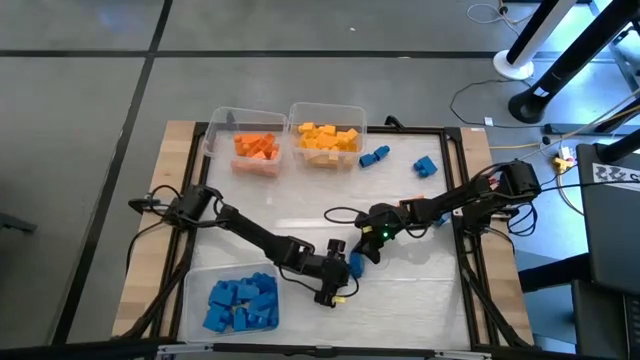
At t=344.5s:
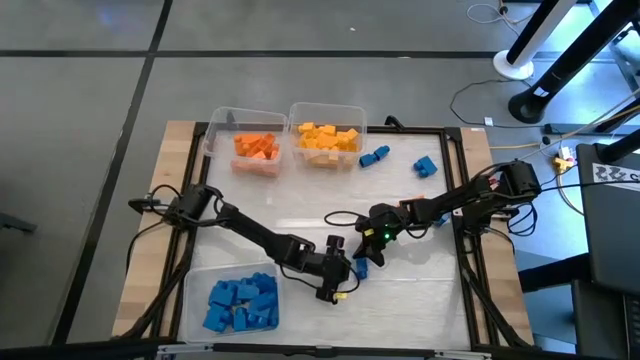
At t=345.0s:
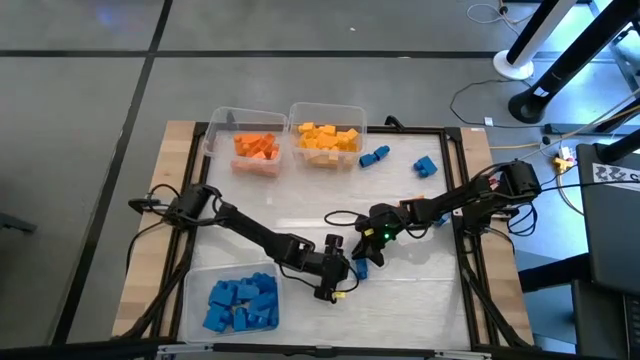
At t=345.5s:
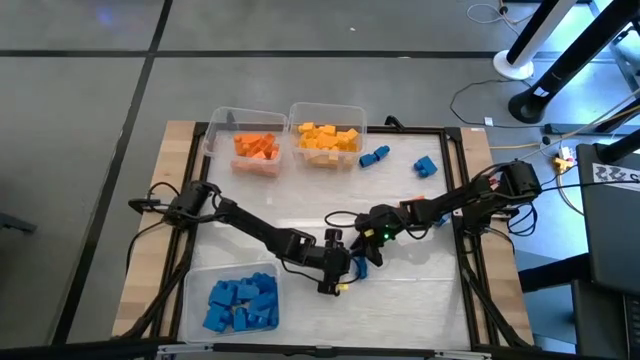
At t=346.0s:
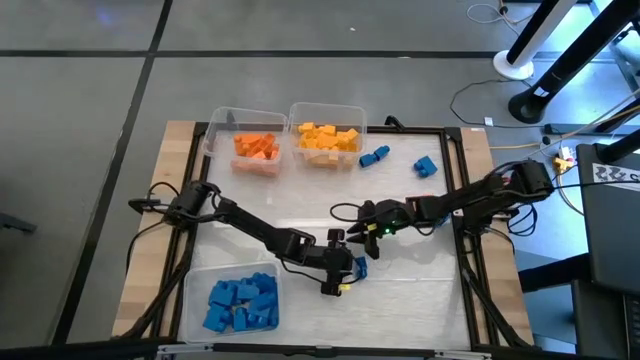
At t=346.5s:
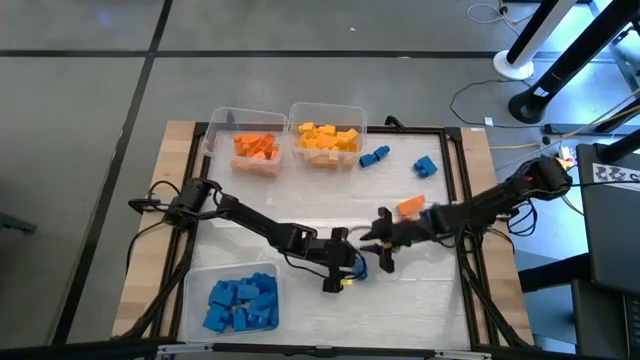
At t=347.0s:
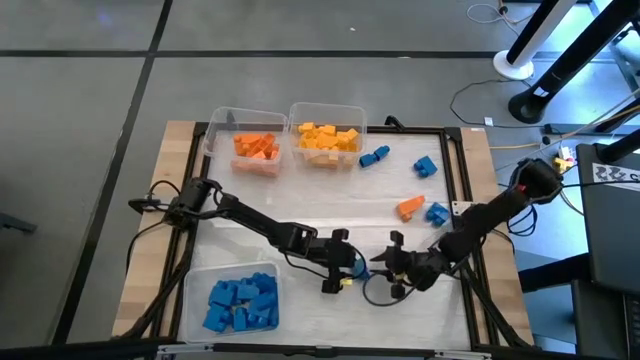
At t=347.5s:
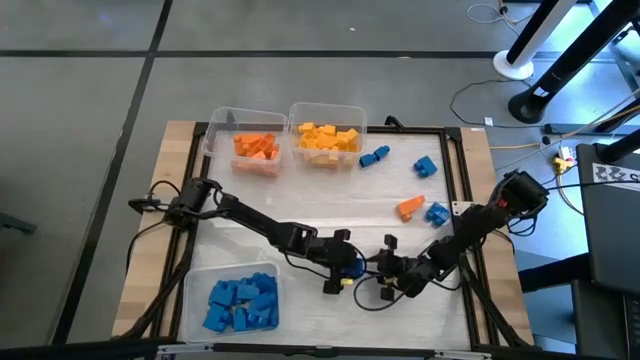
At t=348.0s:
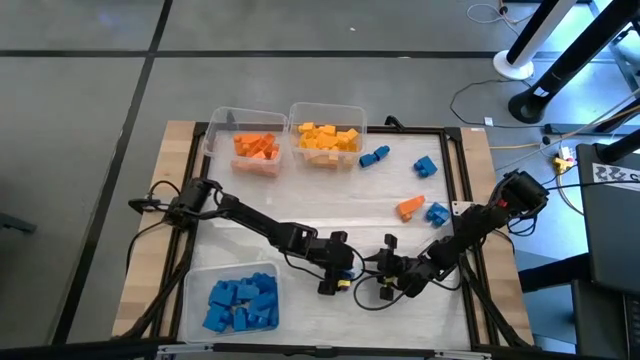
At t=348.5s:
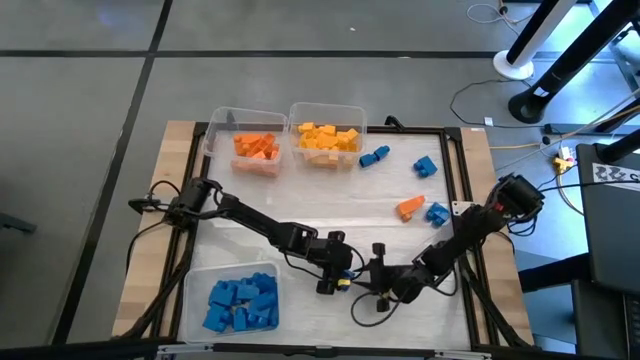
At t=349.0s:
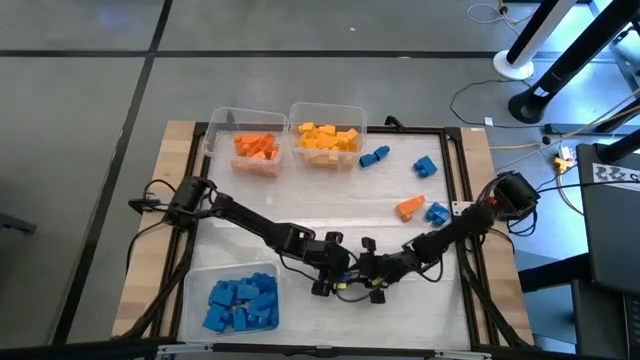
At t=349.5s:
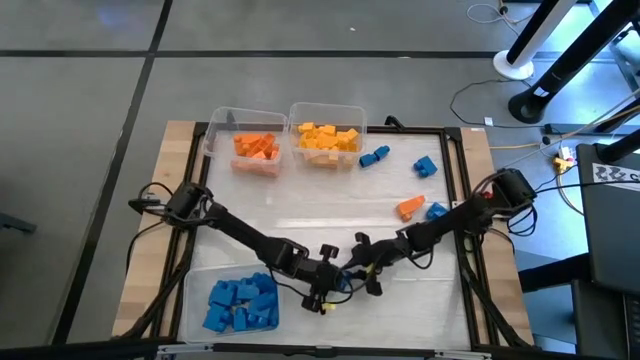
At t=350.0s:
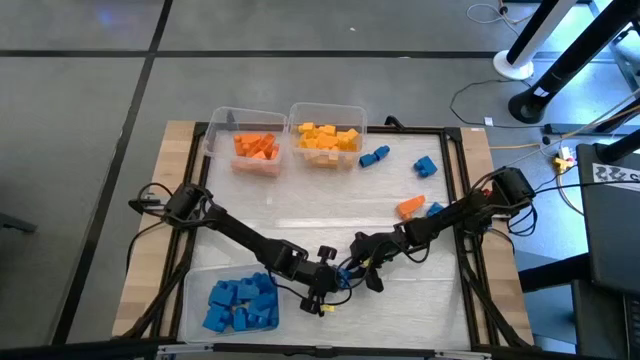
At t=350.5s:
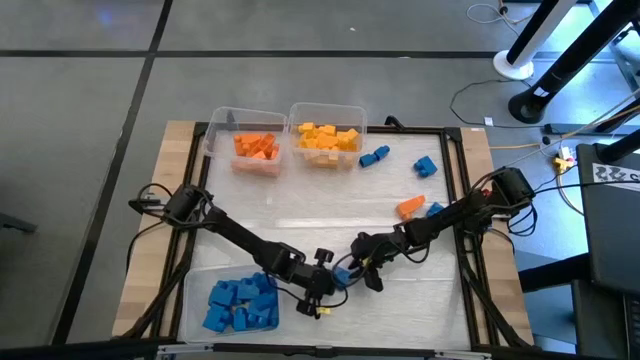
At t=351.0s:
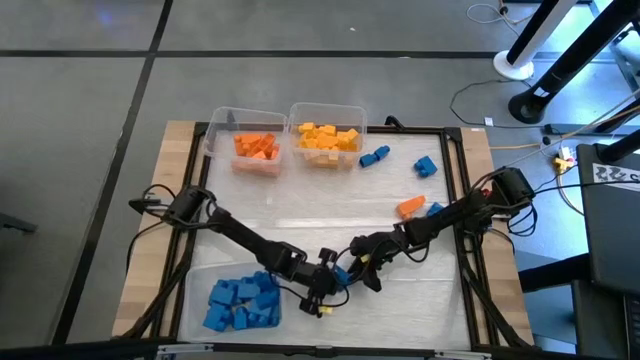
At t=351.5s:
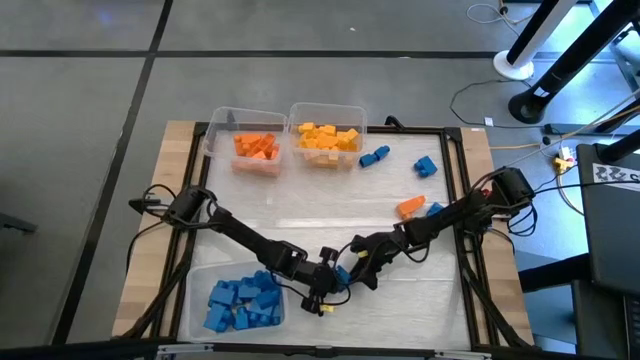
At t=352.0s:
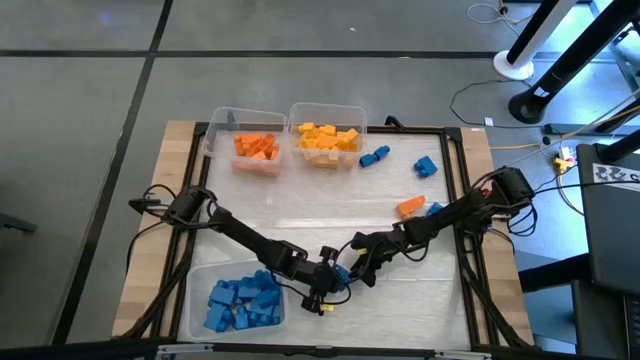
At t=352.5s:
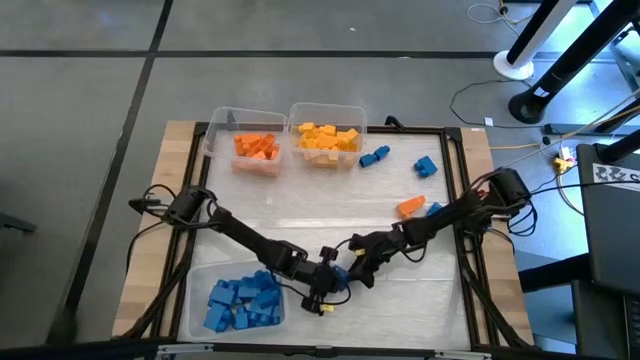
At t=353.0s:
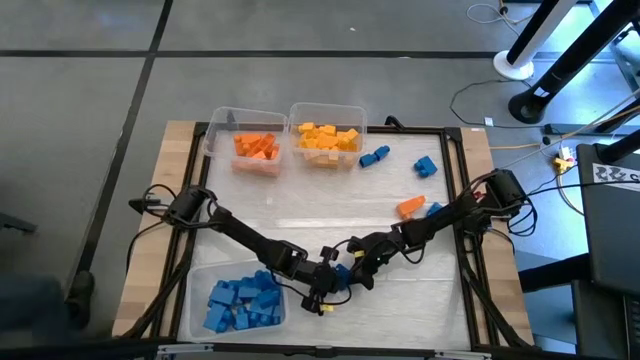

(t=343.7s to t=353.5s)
Task: Sort blocks
Put the blue game piece into the bottom transparent bin

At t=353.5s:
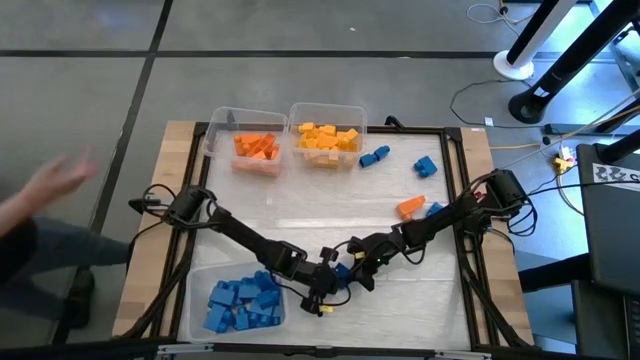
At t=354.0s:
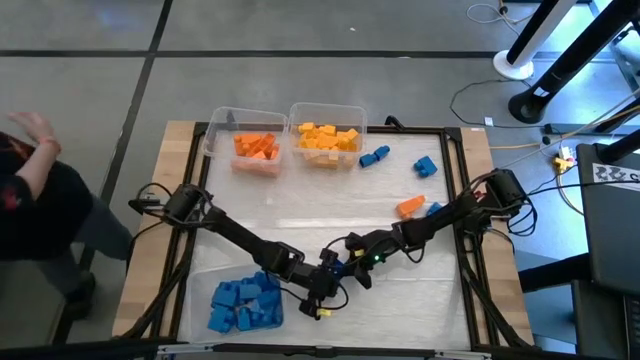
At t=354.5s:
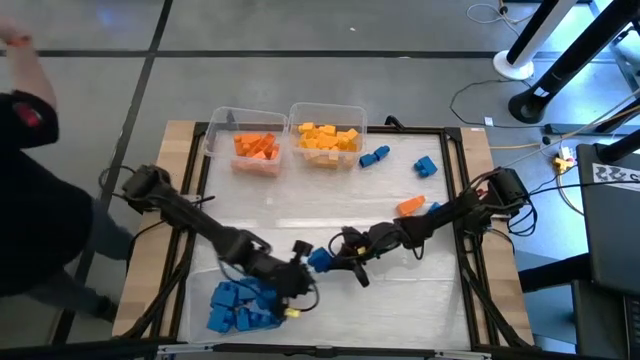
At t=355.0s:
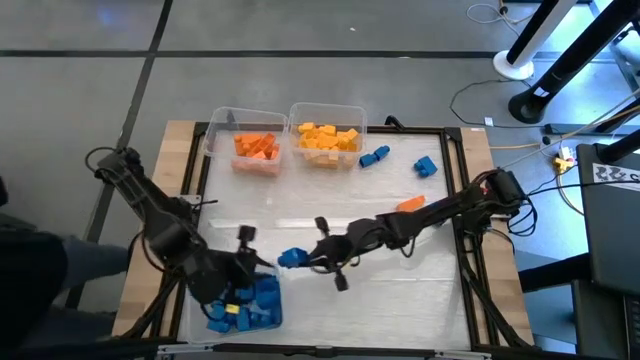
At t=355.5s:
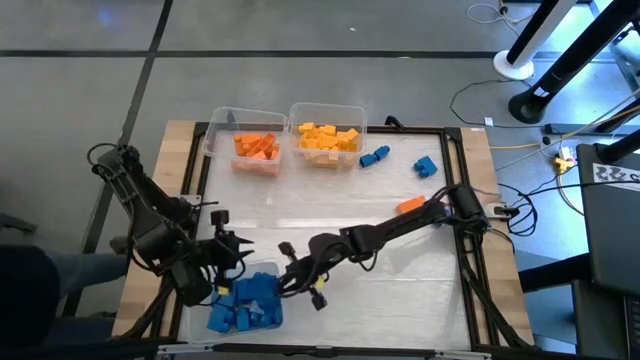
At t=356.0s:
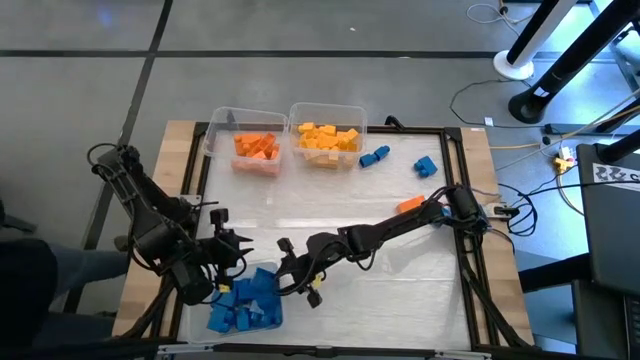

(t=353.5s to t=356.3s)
Put the blue game piece into the bottom transparent bin

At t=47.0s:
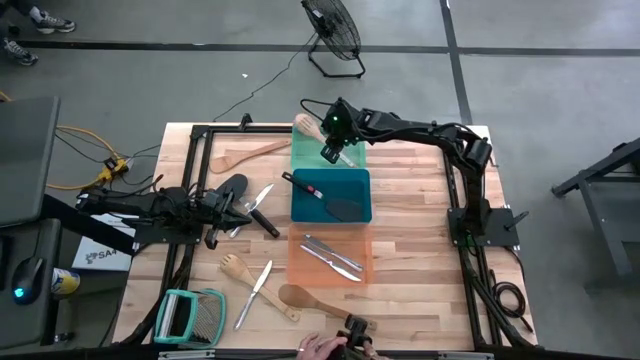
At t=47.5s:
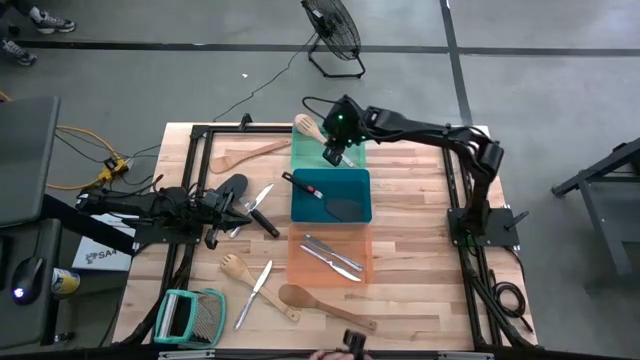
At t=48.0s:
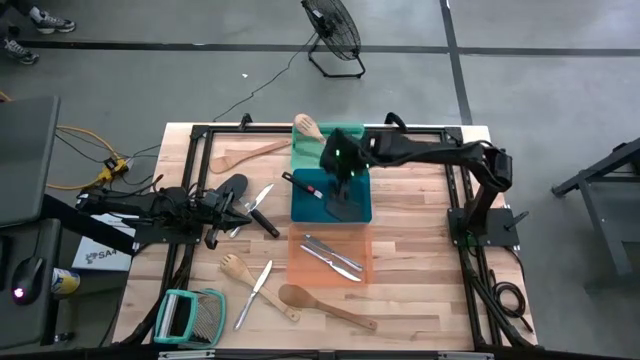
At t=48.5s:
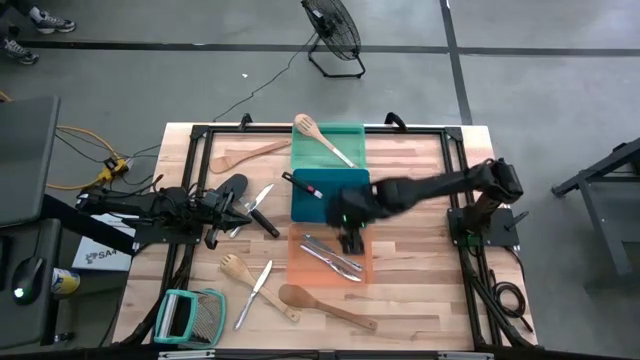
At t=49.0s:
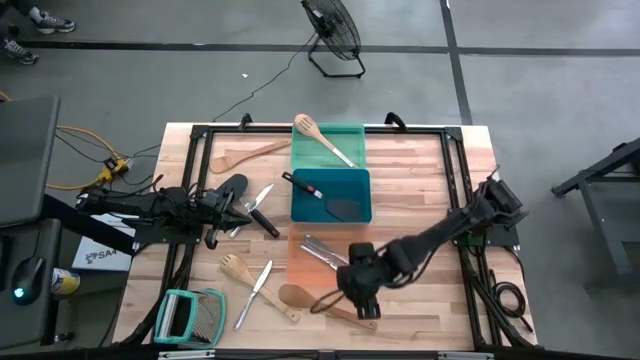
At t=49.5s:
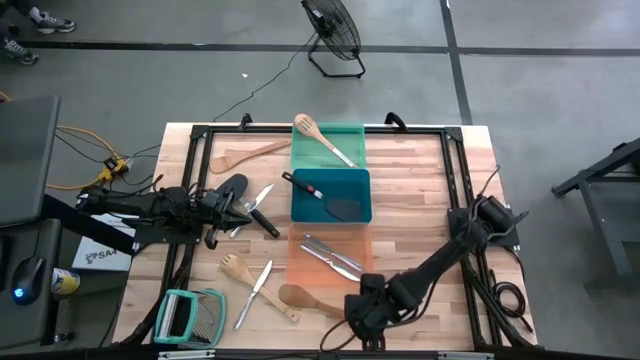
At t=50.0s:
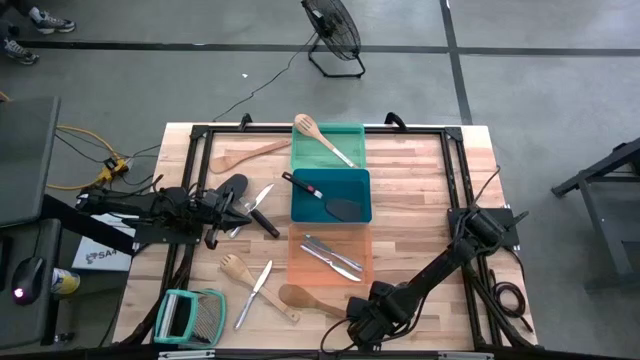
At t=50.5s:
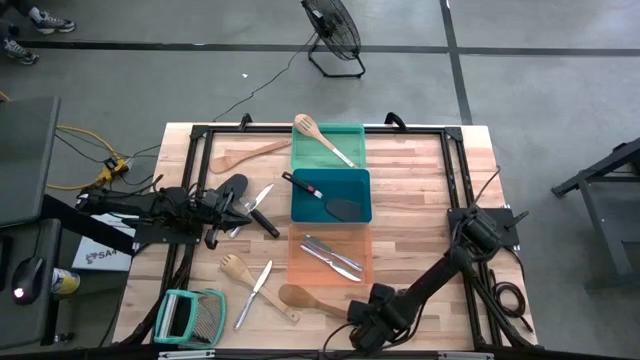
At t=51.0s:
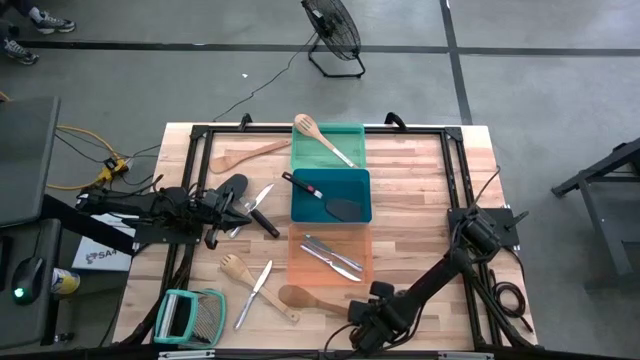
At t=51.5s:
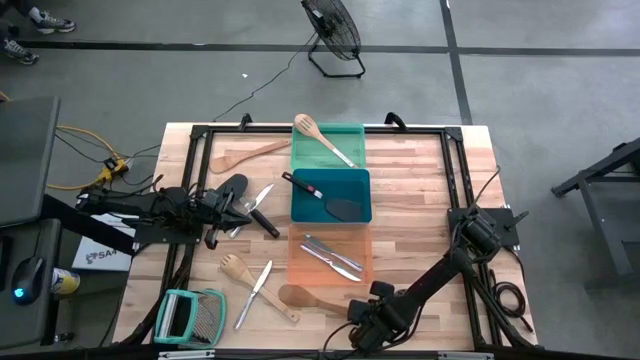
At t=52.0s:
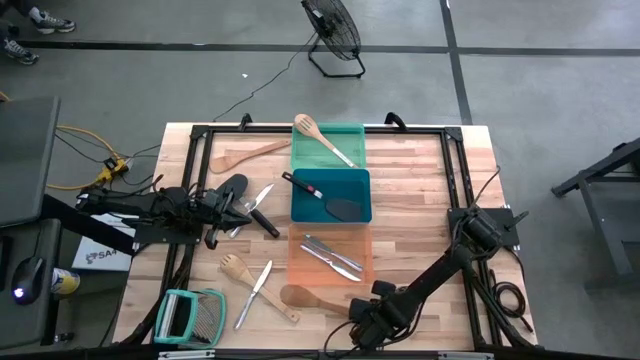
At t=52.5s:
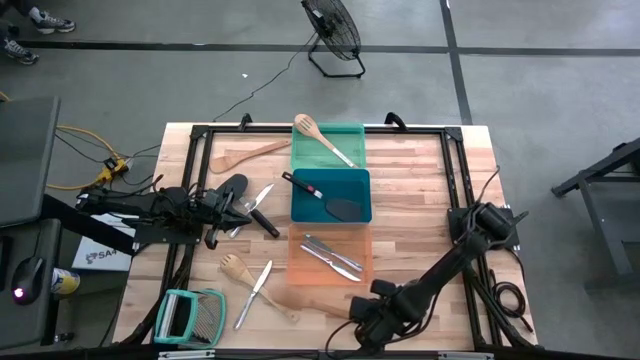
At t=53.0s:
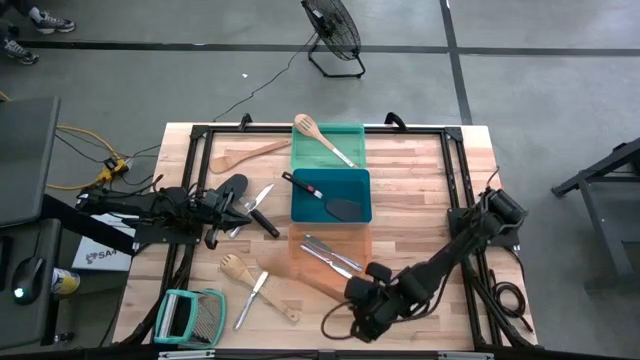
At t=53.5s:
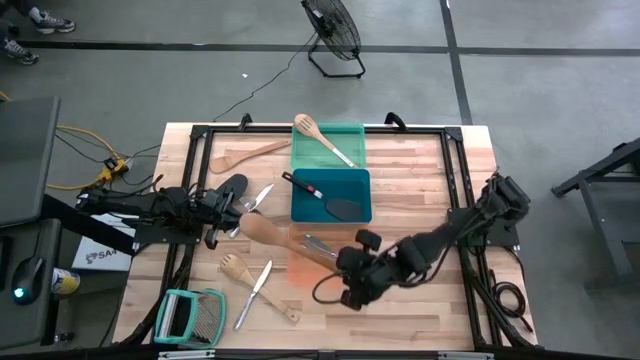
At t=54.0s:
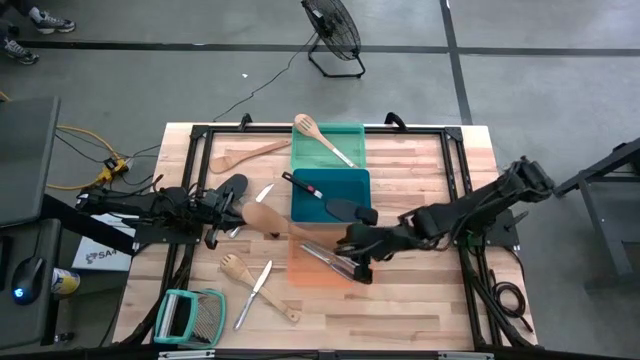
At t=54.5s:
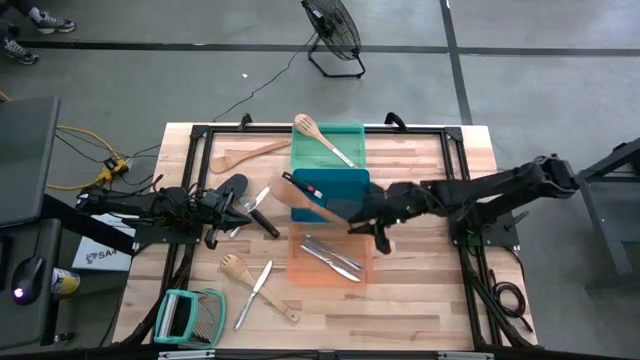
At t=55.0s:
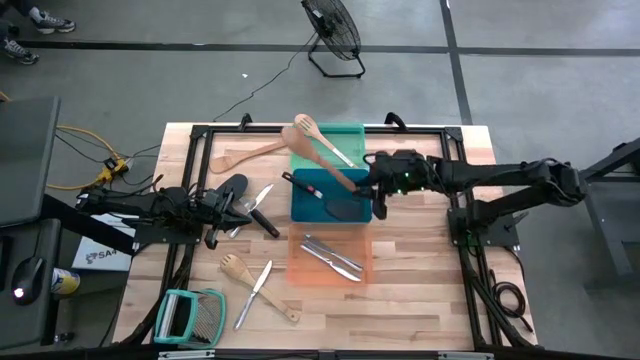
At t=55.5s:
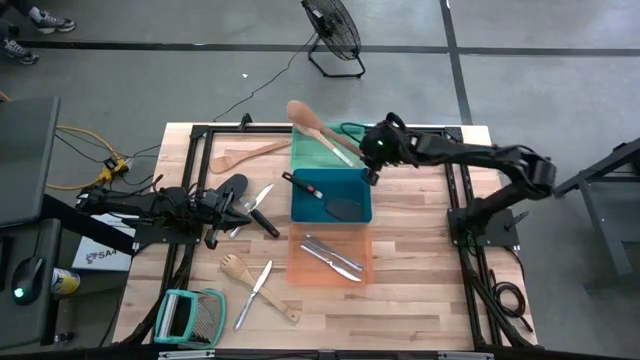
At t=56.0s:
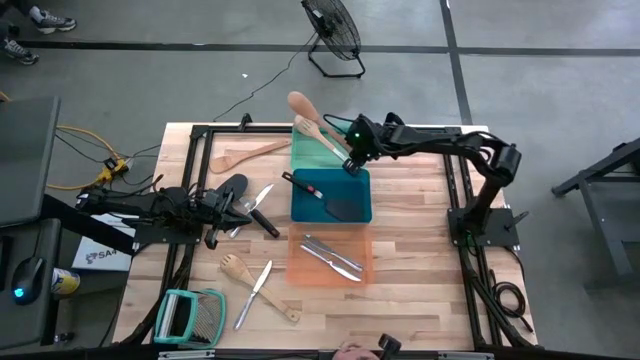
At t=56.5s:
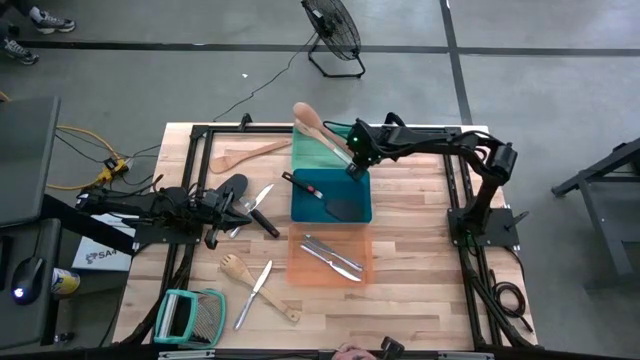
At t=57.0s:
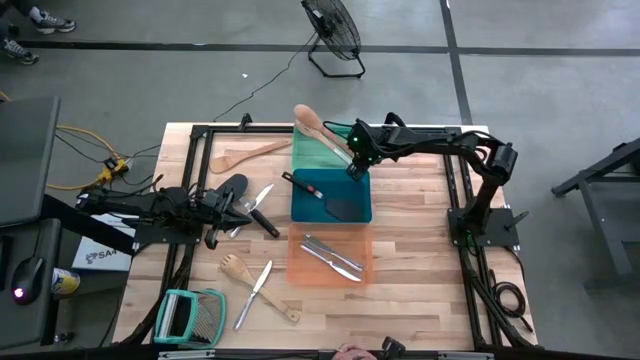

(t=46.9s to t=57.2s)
Task: Pick & Place Kitchen Items
Put the wooden serving spoon into the green bin
